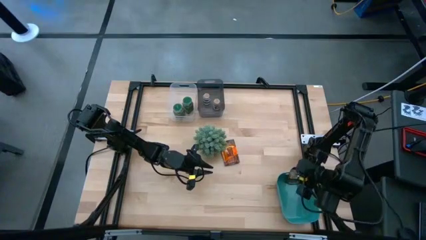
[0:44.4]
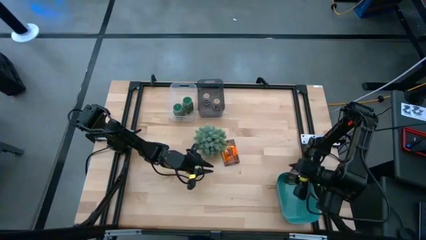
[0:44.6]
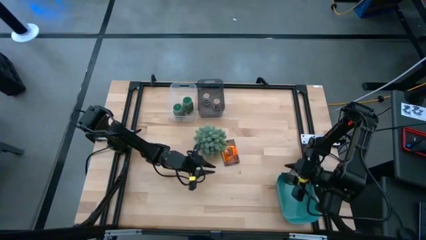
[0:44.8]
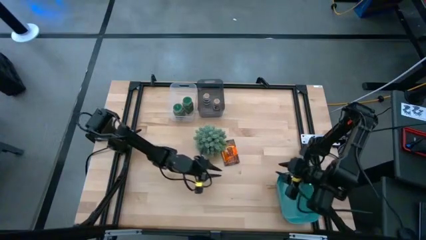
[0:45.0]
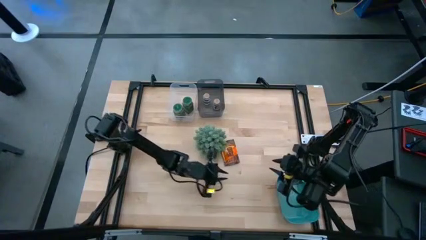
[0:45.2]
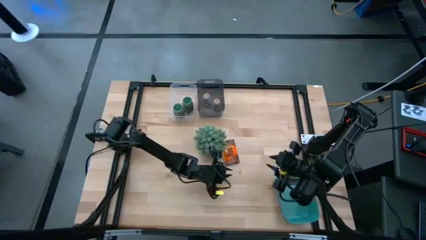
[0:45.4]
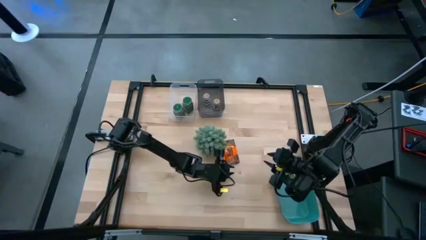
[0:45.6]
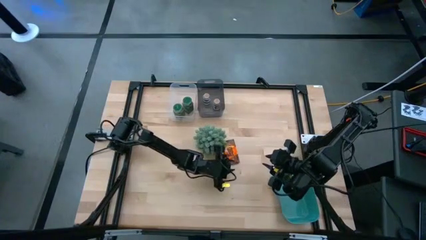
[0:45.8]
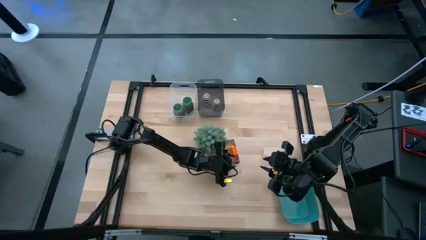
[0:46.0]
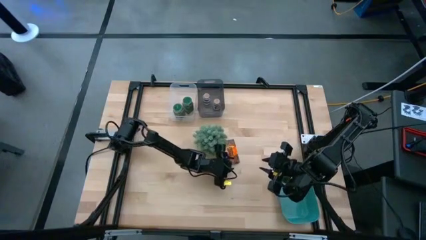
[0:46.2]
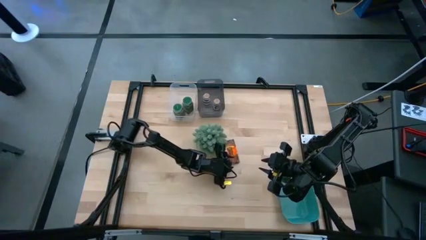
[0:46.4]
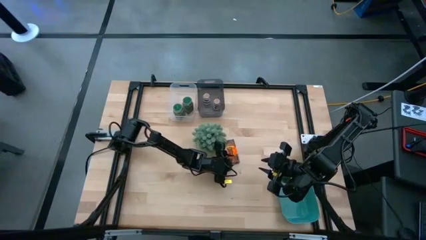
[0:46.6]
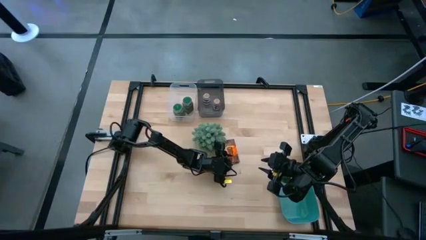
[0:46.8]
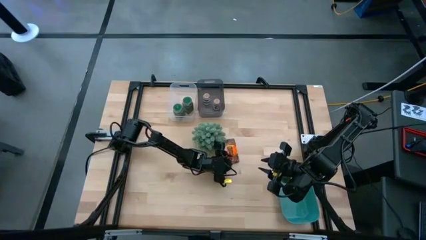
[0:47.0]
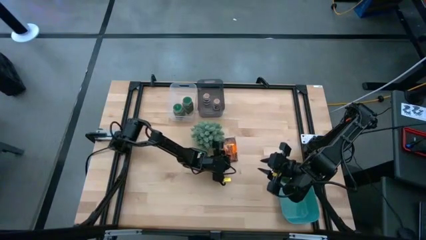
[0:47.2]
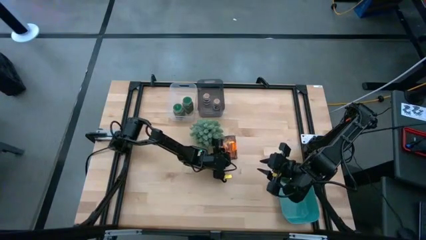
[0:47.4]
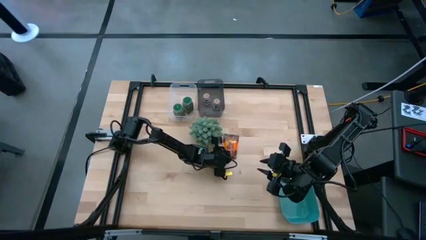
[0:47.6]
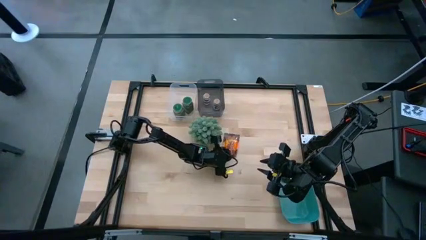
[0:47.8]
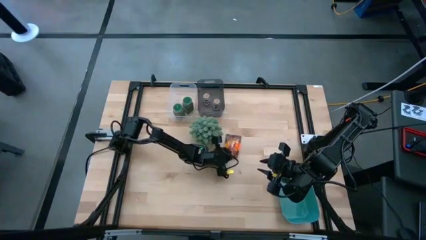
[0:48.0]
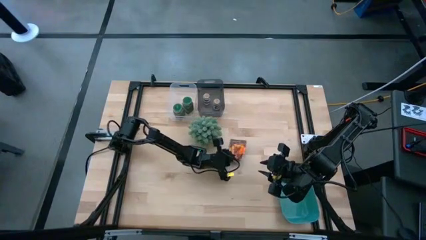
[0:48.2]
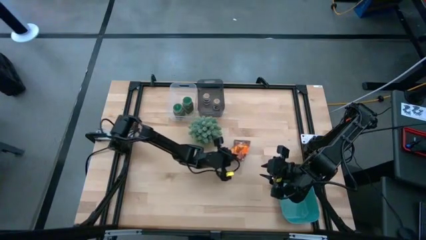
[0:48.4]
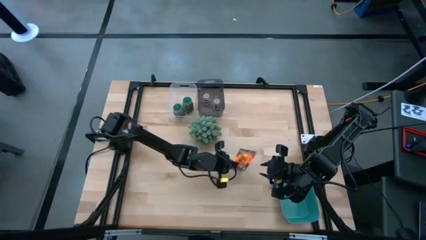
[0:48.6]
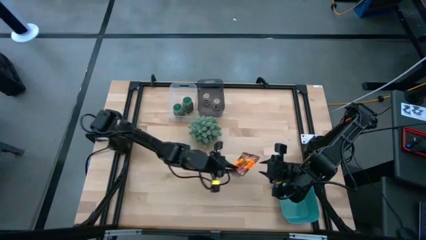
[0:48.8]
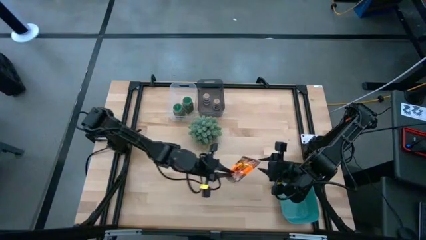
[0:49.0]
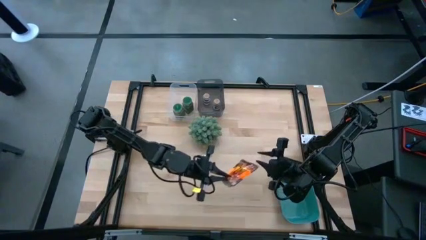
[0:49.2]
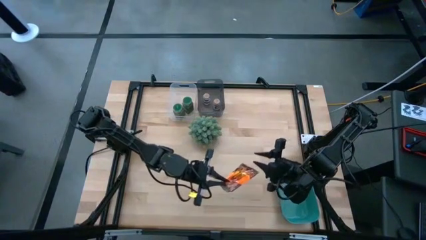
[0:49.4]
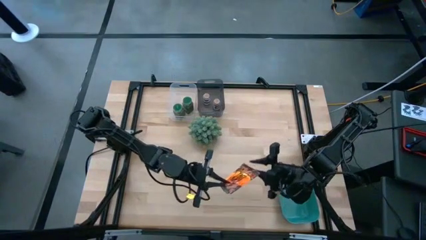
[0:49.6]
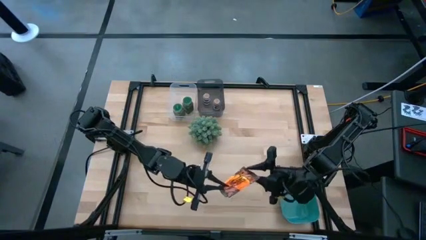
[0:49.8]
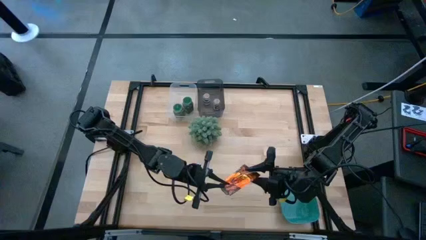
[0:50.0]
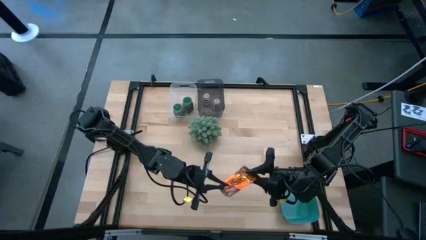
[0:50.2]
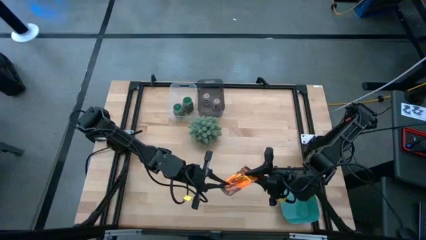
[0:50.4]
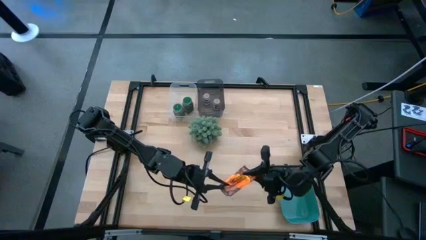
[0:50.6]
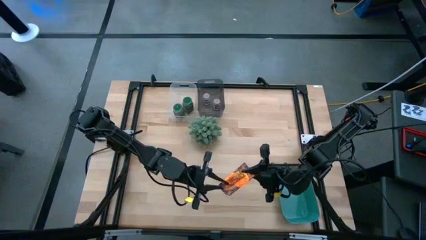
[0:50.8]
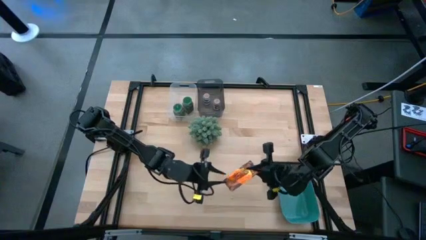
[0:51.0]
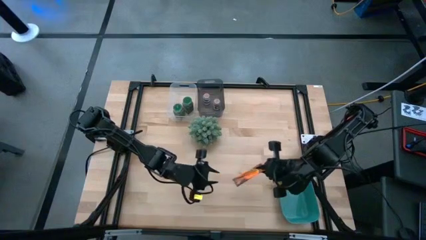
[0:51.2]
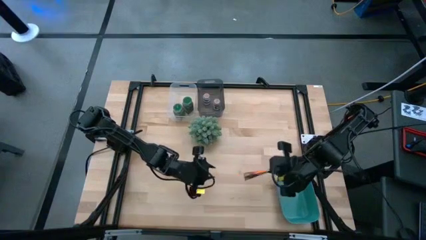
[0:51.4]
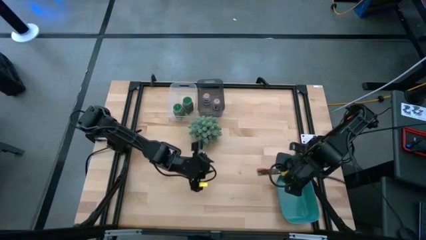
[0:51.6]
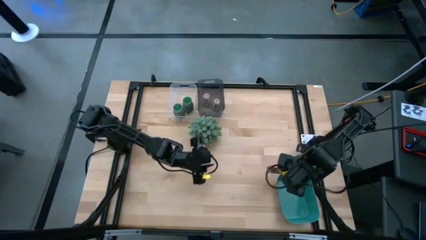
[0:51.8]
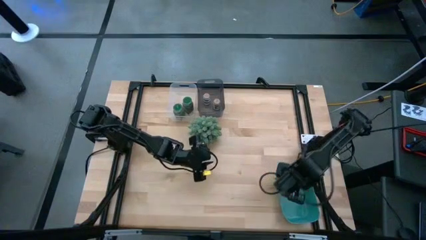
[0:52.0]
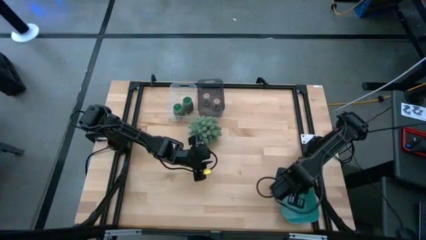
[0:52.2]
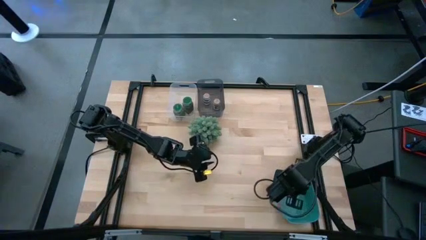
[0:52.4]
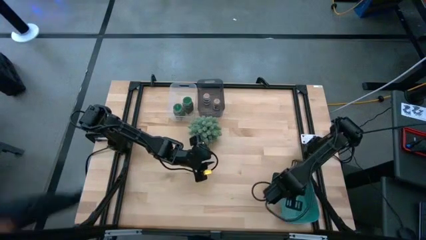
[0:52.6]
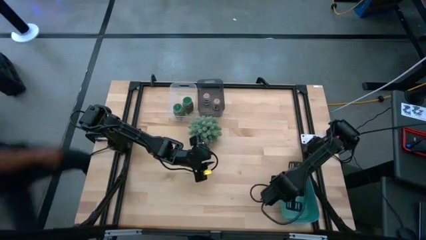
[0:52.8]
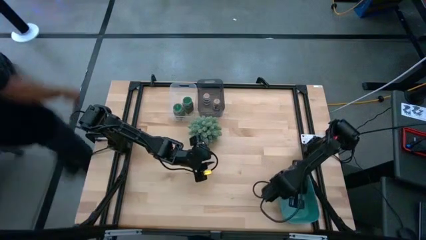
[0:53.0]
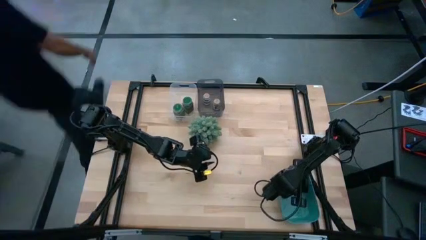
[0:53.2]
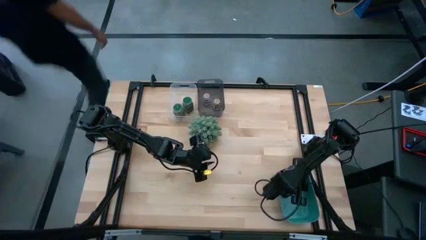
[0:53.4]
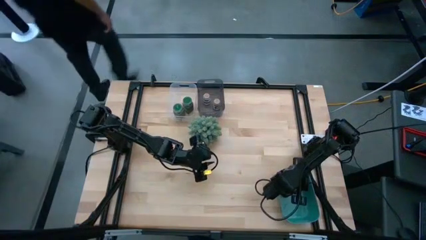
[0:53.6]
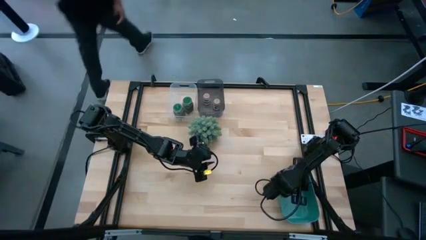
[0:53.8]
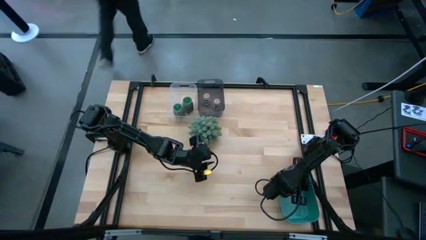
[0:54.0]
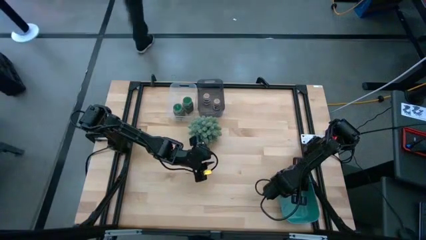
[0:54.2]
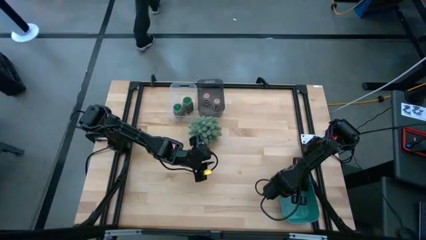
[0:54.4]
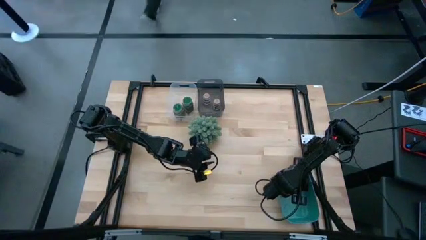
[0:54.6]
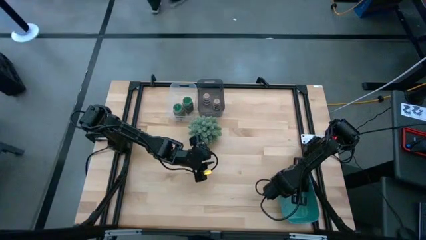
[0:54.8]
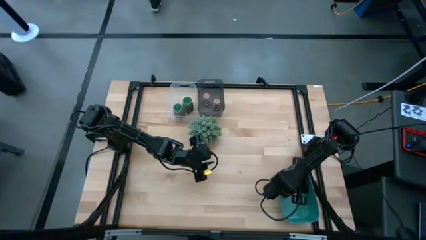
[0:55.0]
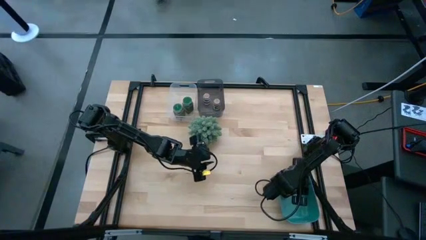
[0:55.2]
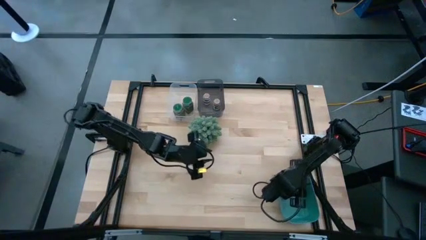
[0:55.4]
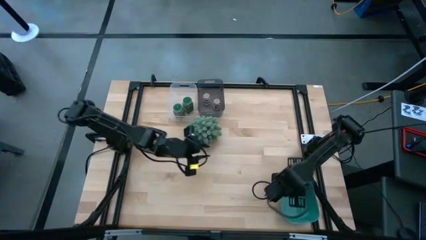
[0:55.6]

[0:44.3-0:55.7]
Task: Sort spices by type
Put the brown sachet seasoning into the blue bin

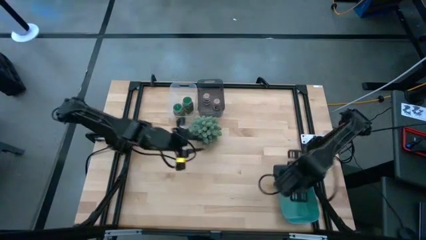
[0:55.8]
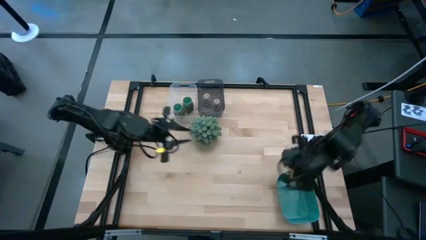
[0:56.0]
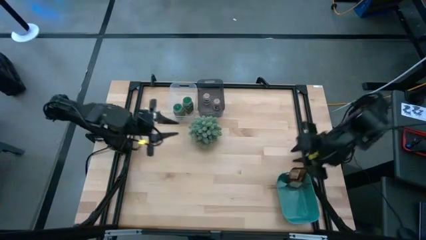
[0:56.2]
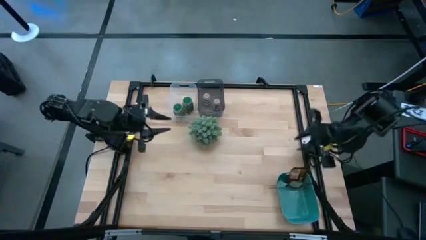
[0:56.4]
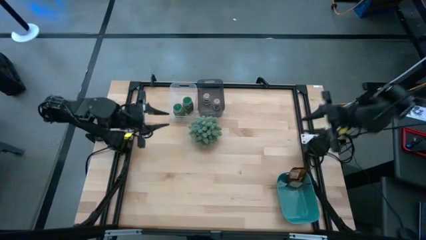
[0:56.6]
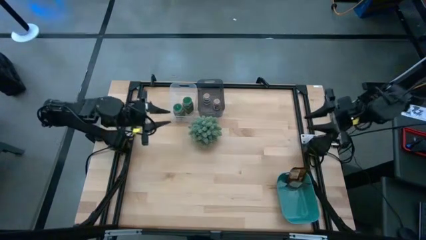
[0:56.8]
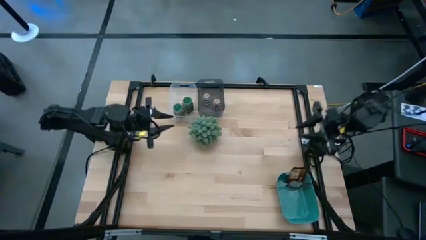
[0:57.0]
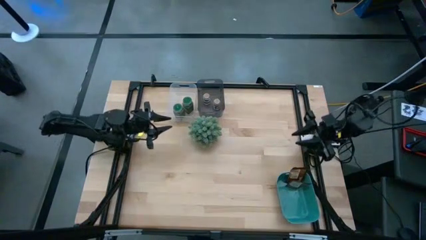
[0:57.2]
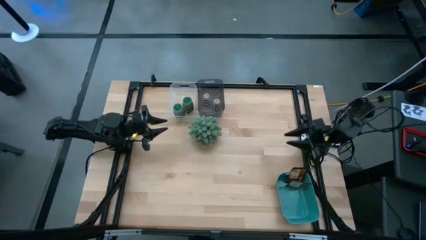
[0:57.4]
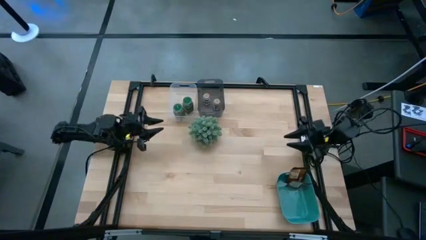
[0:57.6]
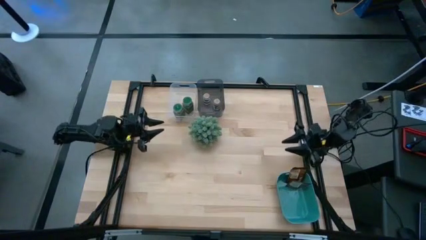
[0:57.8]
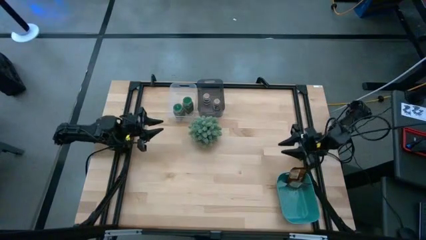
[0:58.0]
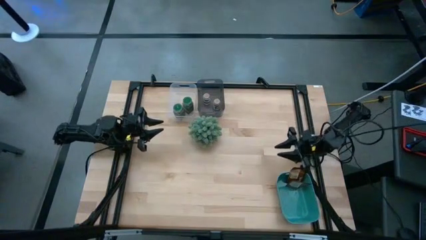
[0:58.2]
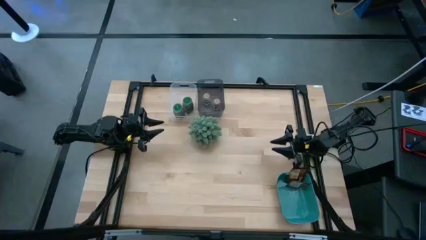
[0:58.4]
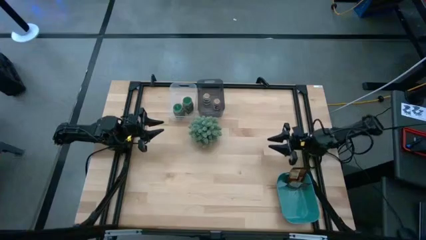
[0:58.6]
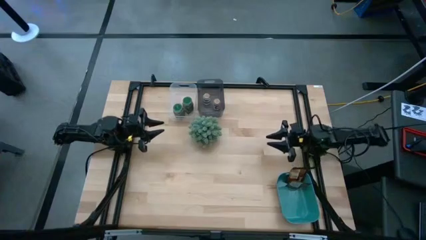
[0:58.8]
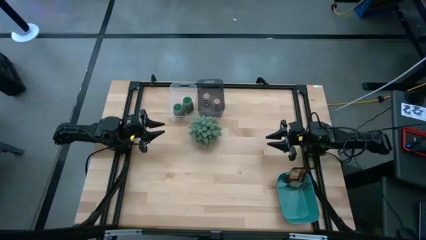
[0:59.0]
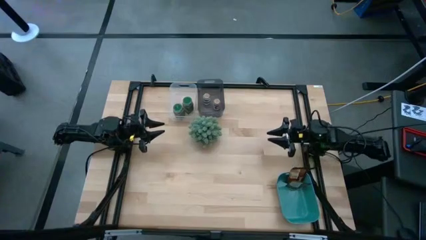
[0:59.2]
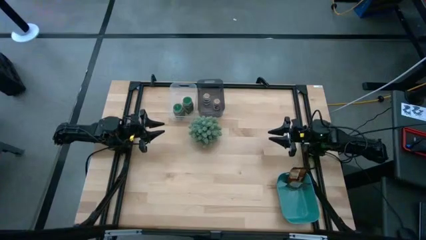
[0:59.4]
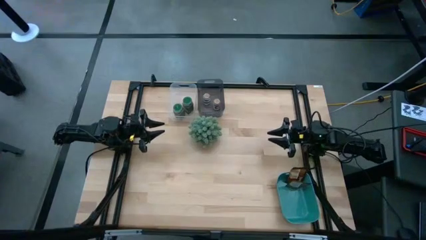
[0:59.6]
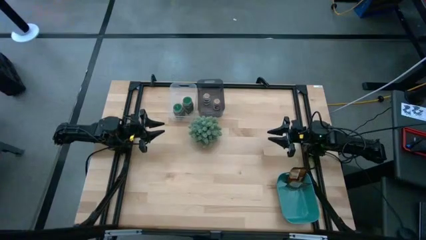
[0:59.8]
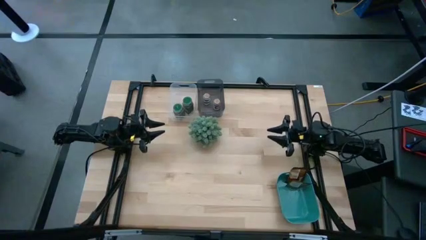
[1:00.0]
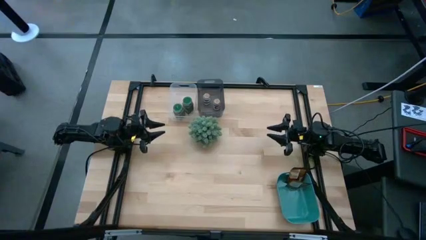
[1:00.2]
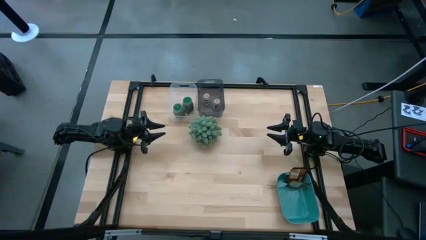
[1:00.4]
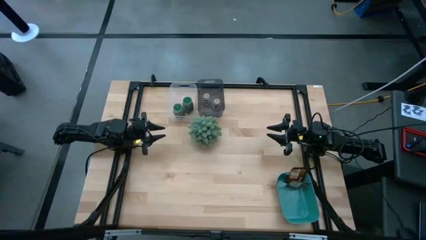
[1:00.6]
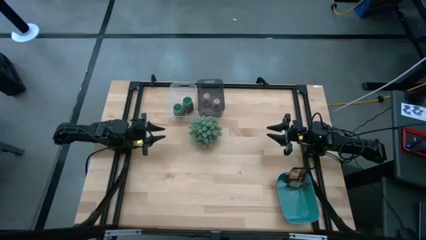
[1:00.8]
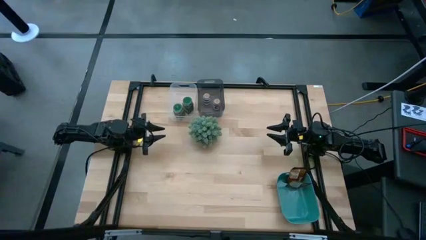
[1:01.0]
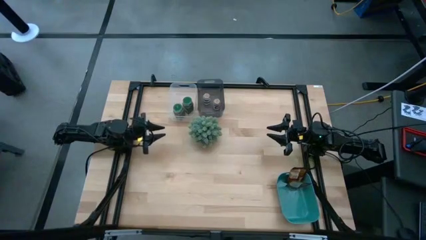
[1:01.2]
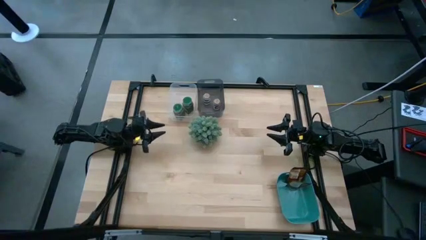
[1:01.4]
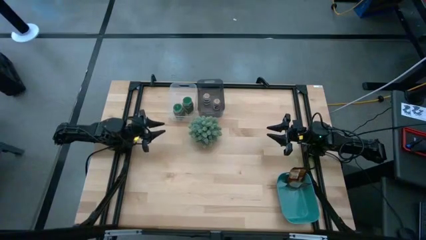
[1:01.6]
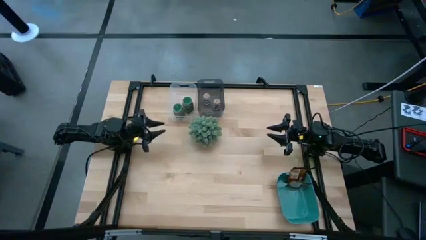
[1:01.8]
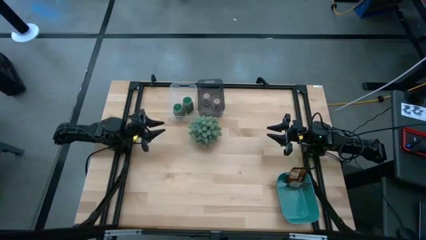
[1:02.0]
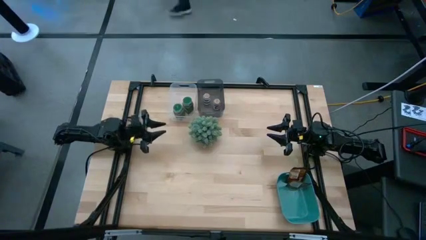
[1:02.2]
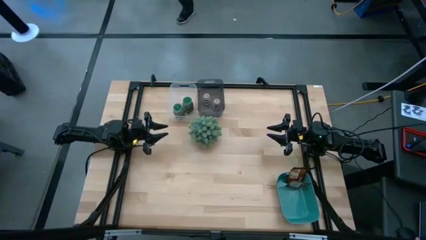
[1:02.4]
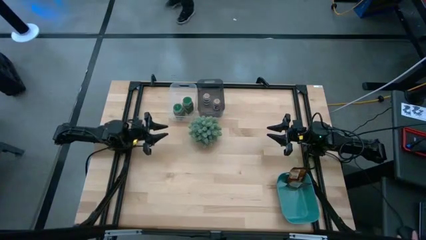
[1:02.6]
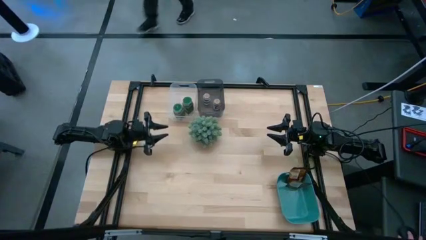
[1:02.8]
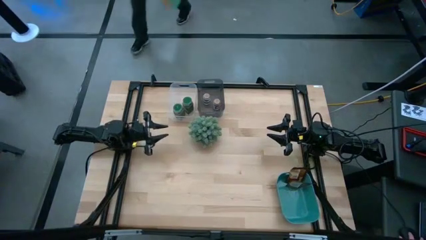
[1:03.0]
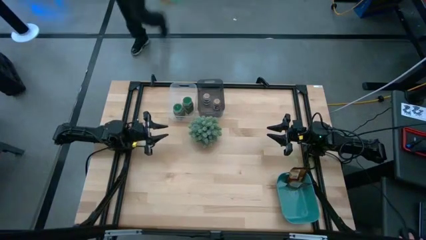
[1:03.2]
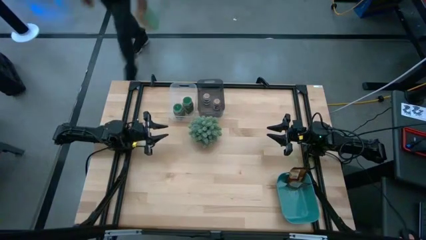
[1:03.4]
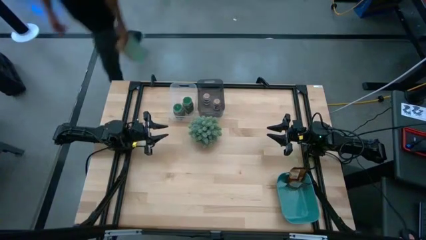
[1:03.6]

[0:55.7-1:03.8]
Return to Home Position
